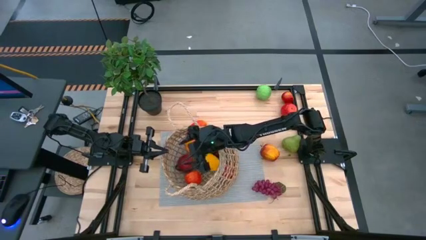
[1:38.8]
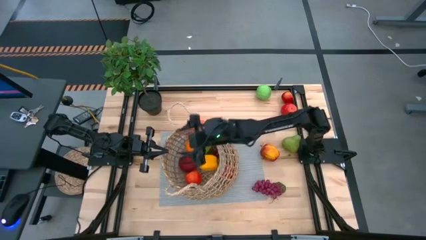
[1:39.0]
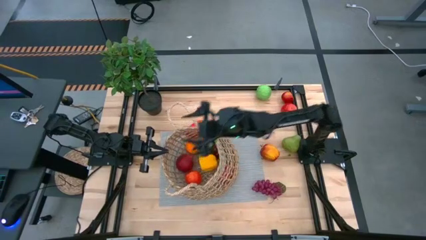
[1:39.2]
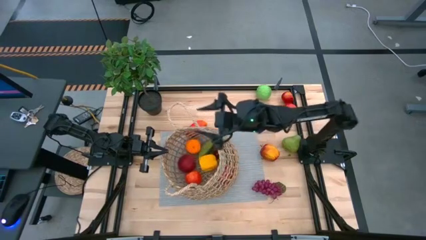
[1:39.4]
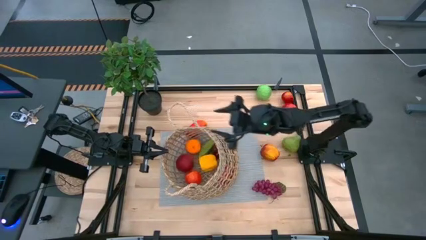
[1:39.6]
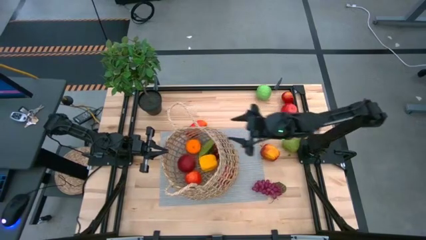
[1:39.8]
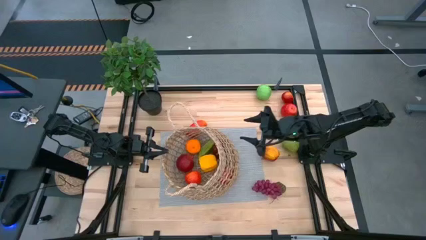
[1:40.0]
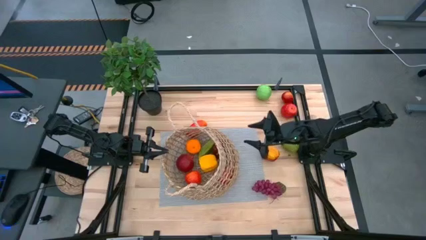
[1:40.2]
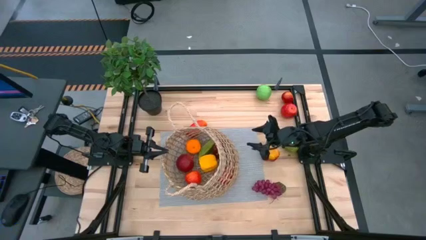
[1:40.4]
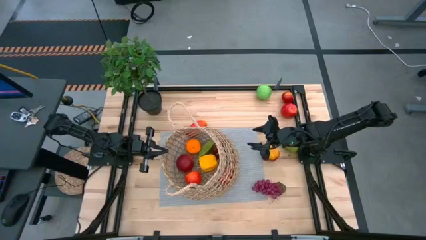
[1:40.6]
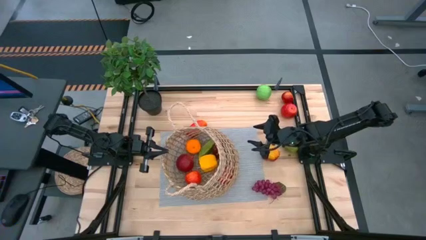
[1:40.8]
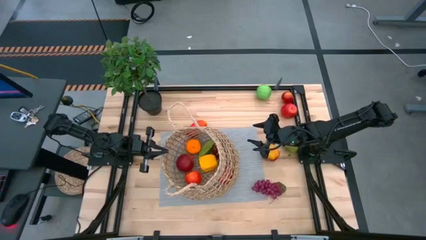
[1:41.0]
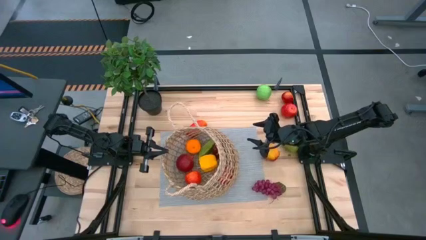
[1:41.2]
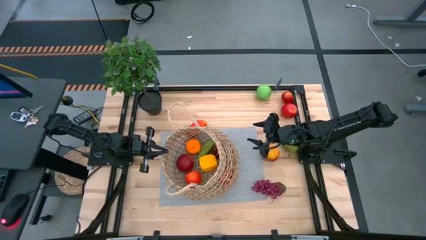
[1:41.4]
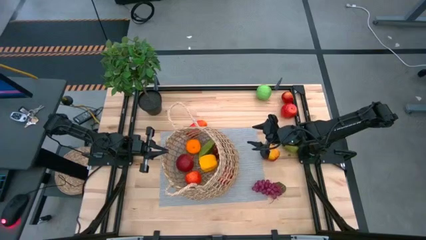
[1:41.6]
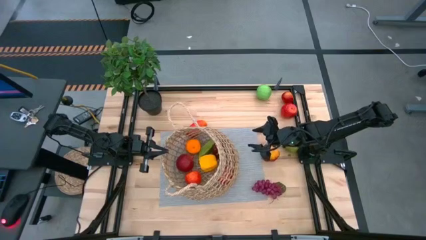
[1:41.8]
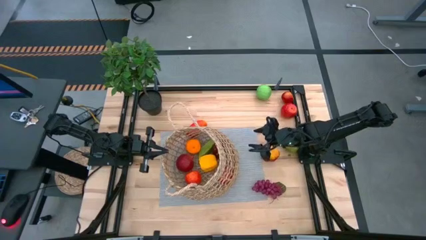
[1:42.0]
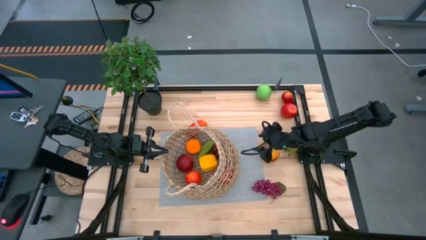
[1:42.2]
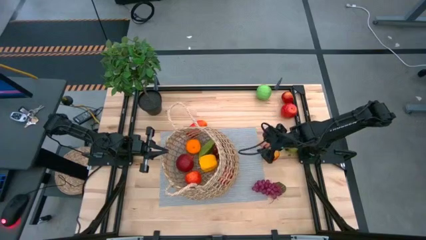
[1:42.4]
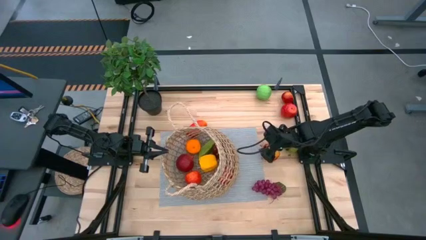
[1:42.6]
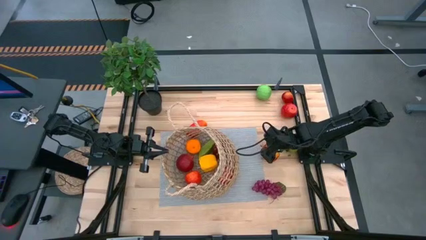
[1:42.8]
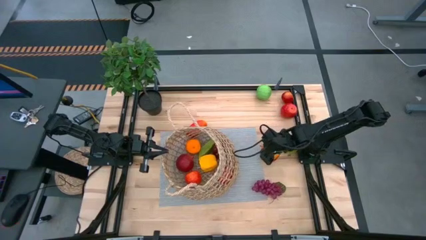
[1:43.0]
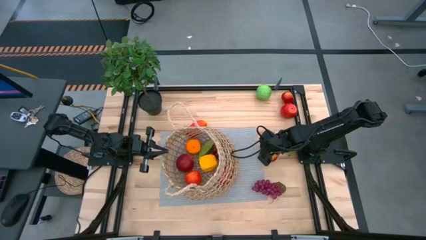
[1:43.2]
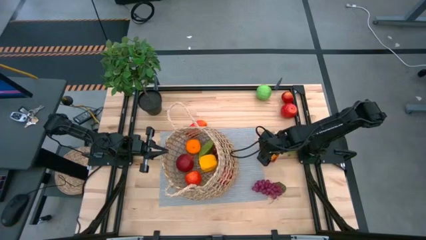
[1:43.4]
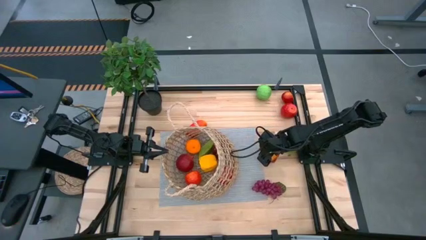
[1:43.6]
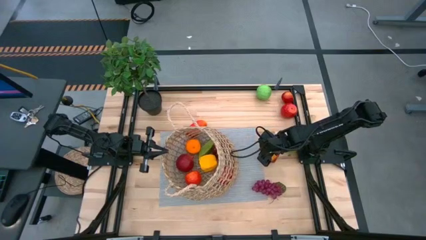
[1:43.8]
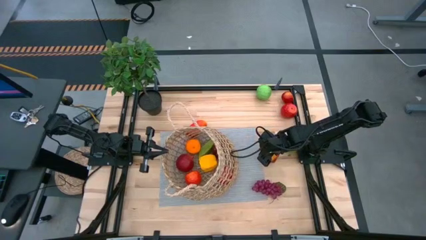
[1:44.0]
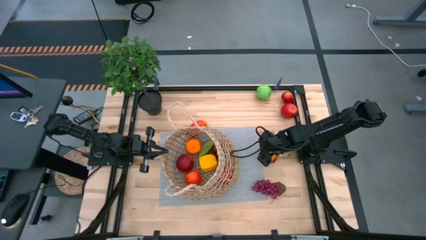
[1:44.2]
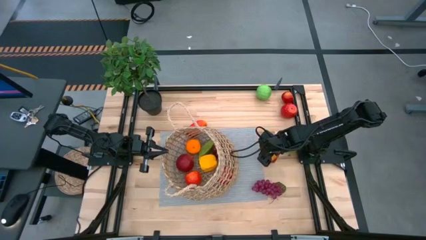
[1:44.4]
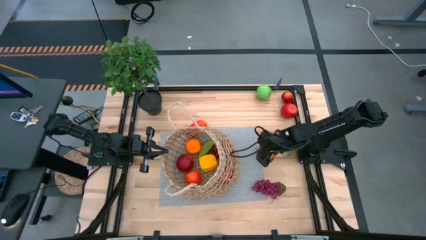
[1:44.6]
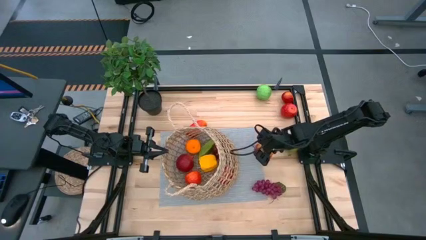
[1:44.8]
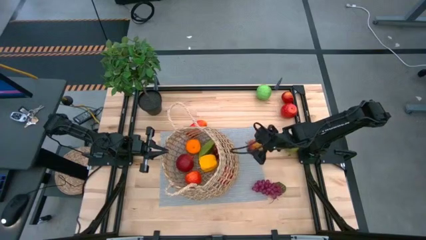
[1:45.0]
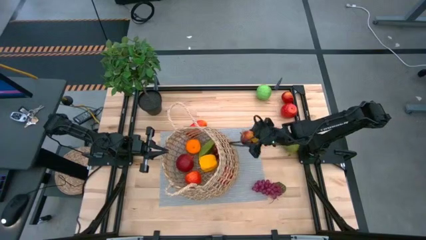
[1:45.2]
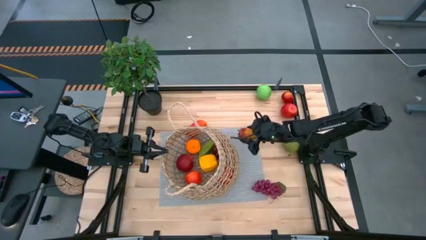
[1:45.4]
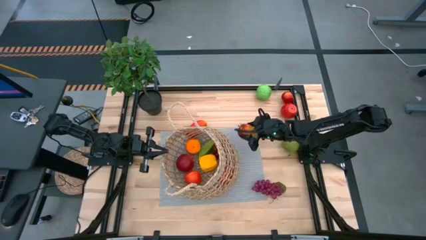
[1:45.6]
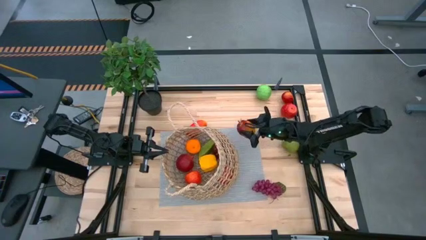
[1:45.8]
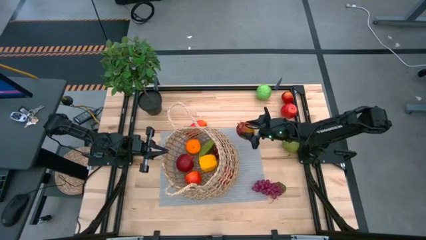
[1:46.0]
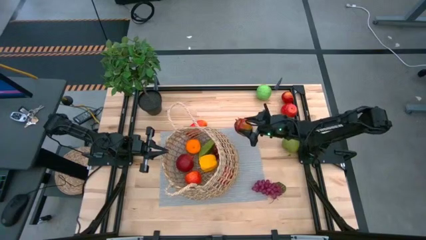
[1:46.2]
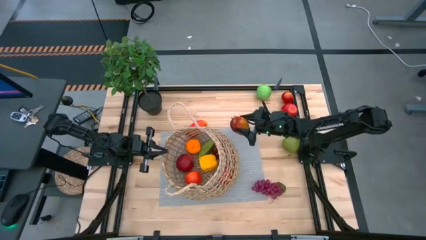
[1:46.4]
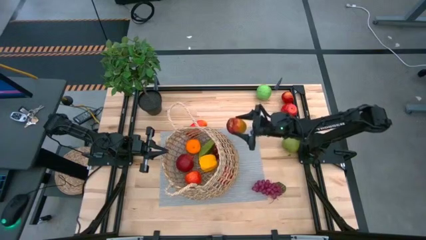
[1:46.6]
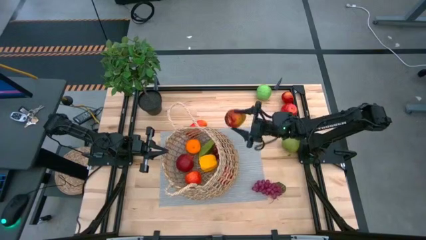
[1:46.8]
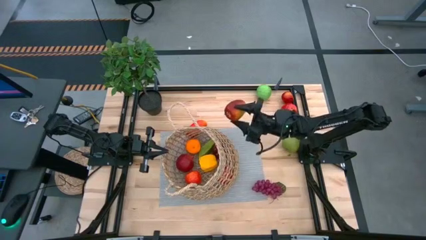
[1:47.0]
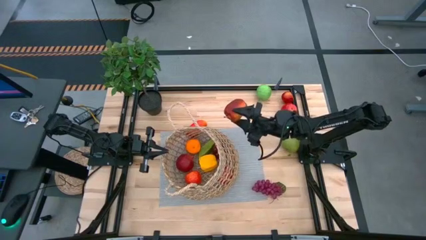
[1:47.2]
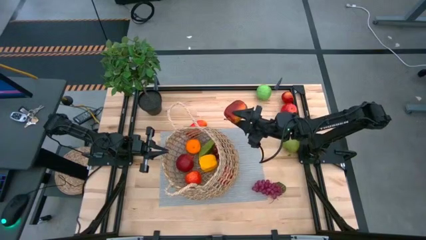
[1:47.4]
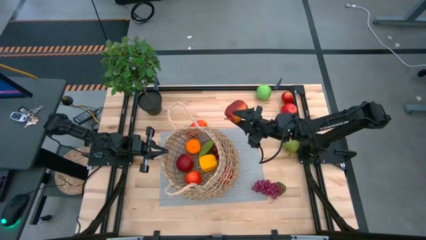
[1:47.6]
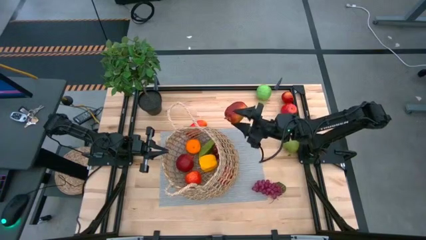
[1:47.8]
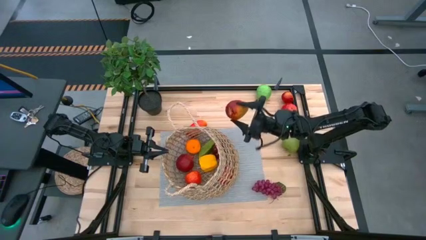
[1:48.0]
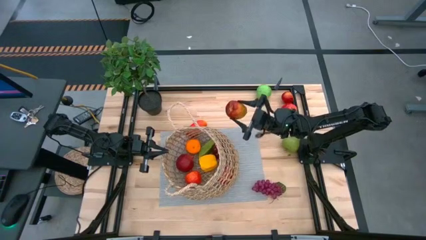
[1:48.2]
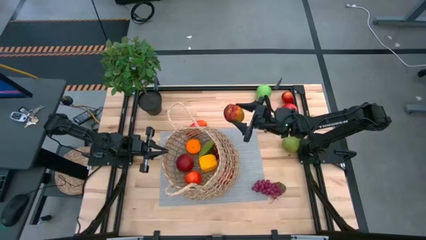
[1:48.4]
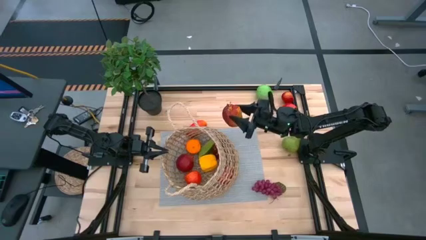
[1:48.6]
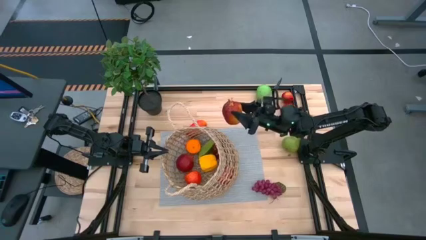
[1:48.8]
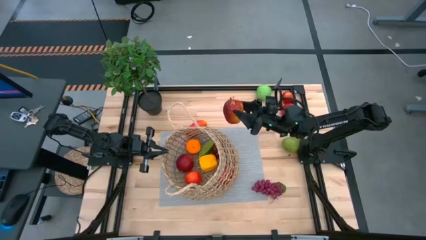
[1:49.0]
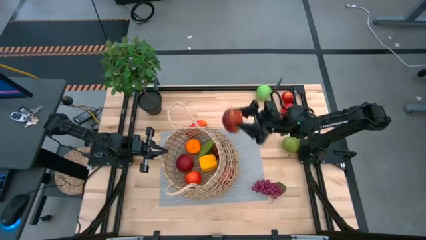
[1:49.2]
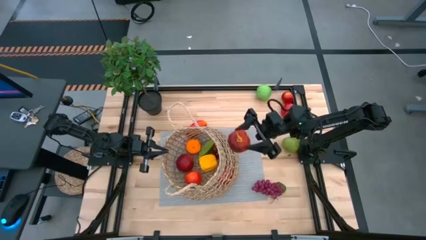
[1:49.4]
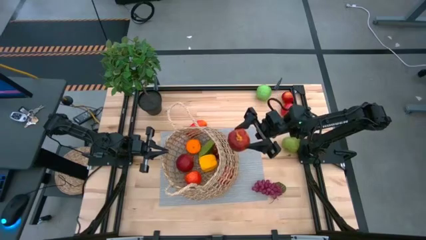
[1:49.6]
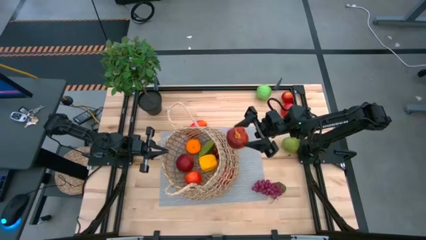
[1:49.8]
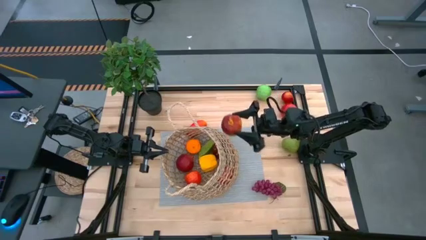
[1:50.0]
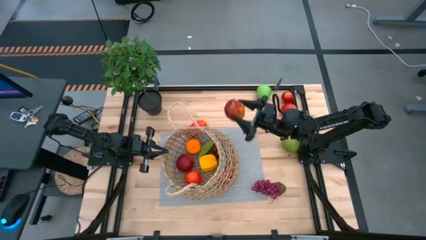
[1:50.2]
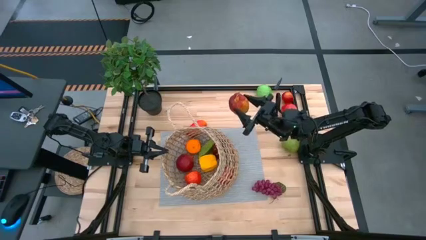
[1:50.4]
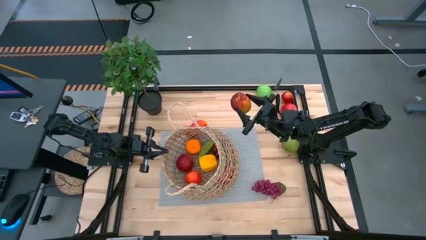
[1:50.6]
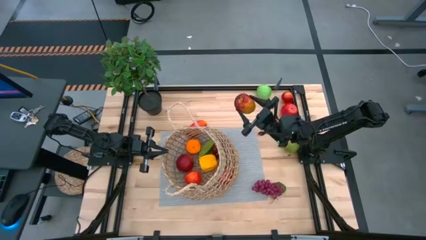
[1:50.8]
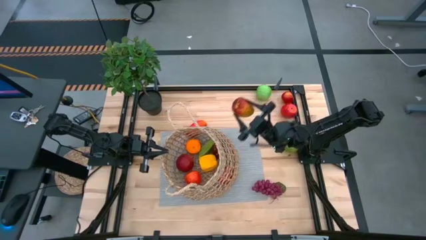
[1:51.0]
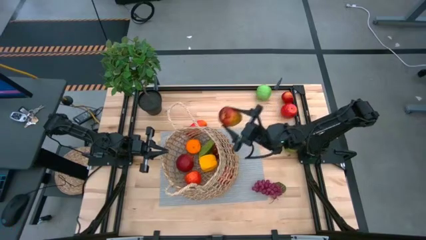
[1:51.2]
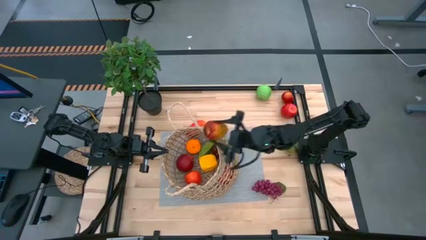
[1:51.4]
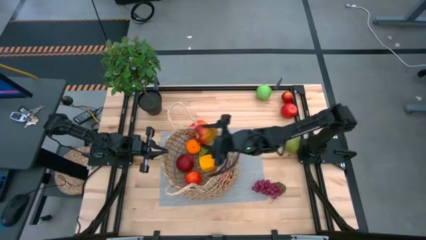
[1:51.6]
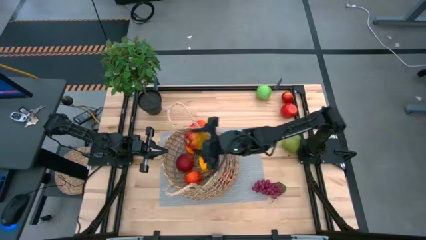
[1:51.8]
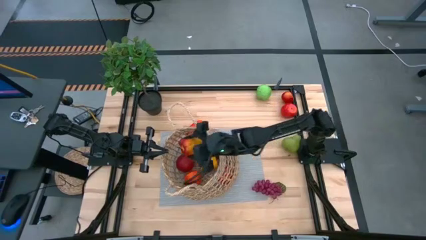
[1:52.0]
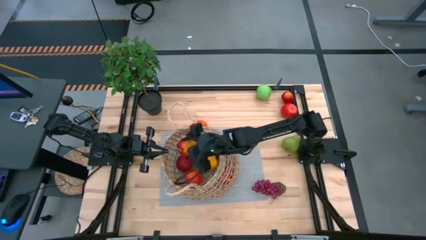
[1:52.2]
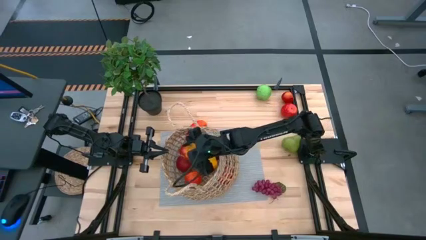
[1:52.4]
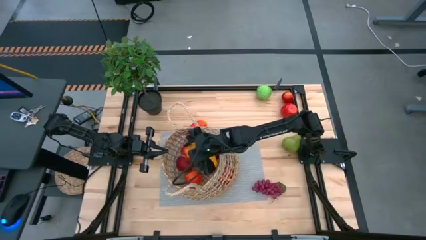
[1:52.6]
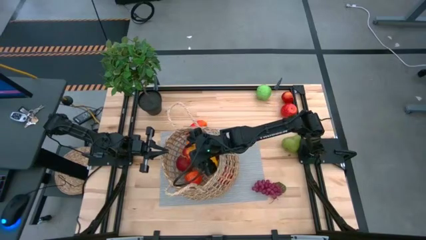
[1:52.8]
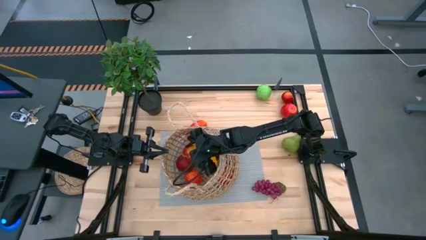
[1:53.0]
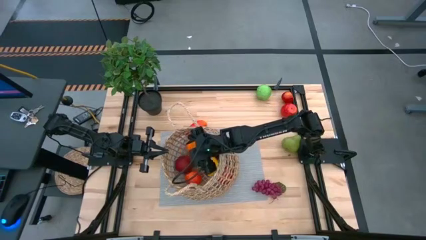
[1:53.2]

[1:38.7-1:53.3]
Task: Build produce basket
Put the red apple into the brown woven basket
